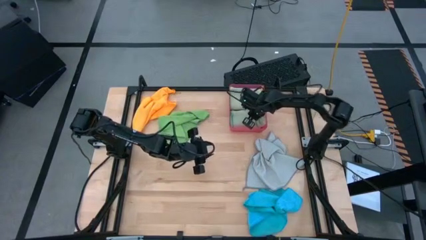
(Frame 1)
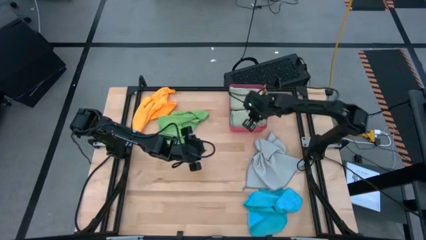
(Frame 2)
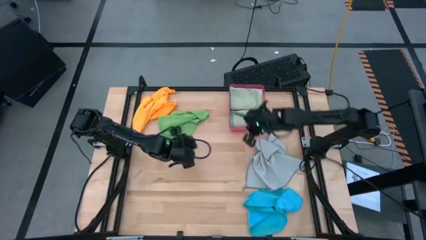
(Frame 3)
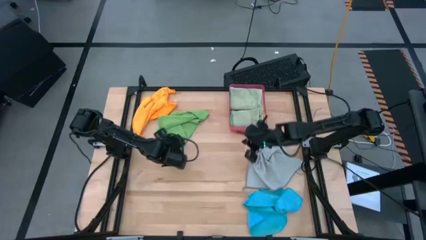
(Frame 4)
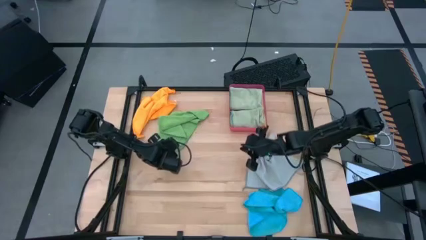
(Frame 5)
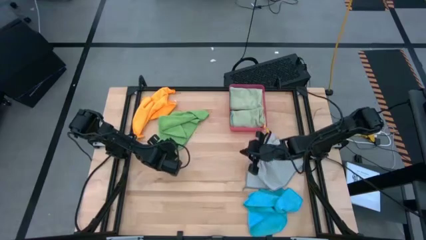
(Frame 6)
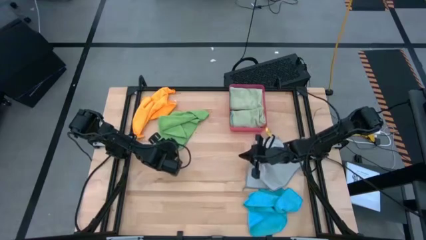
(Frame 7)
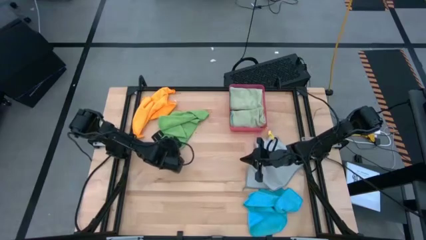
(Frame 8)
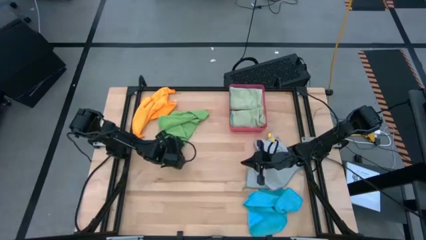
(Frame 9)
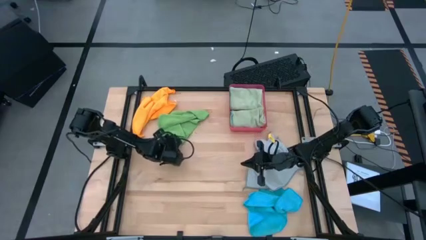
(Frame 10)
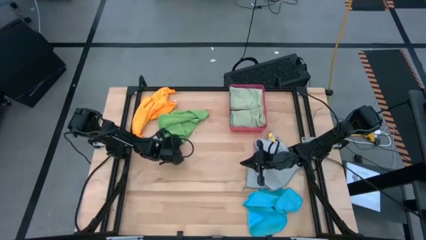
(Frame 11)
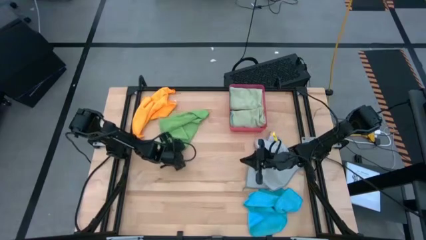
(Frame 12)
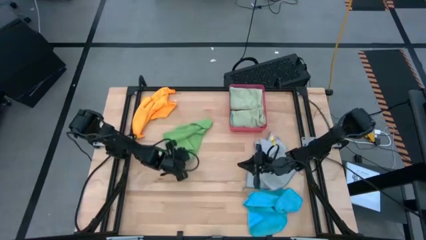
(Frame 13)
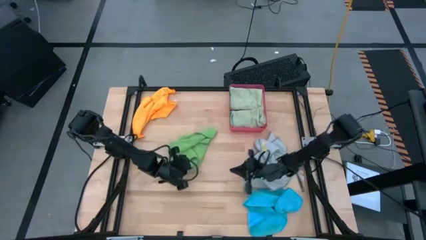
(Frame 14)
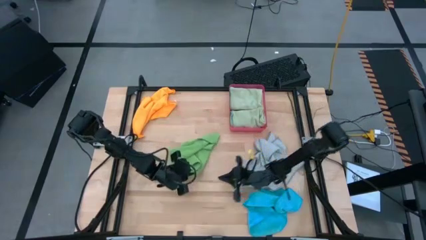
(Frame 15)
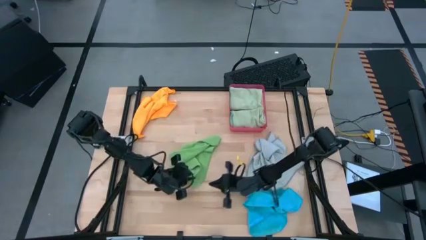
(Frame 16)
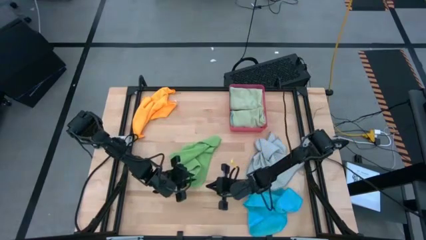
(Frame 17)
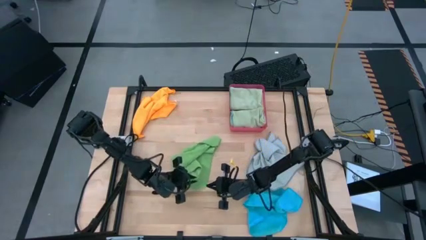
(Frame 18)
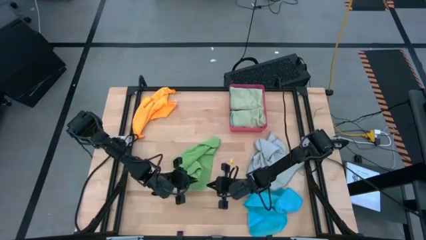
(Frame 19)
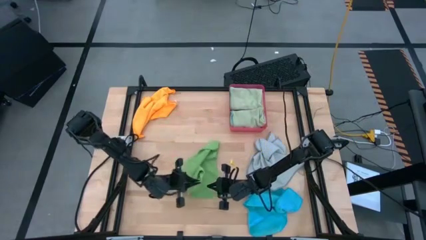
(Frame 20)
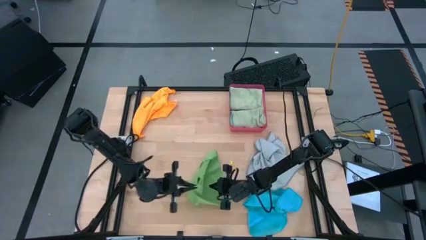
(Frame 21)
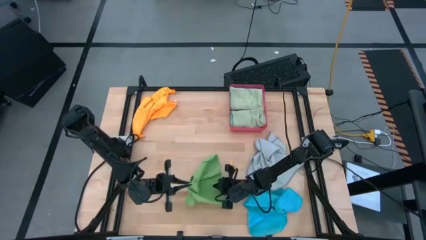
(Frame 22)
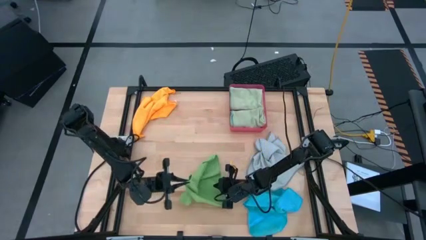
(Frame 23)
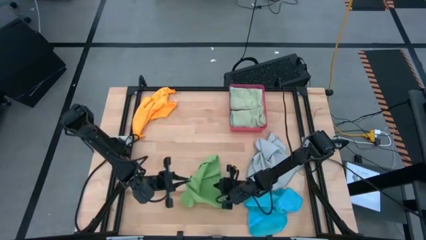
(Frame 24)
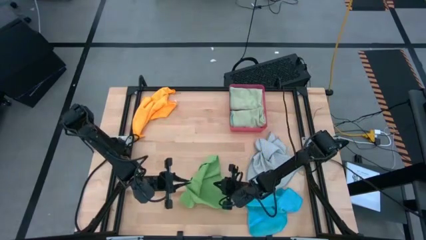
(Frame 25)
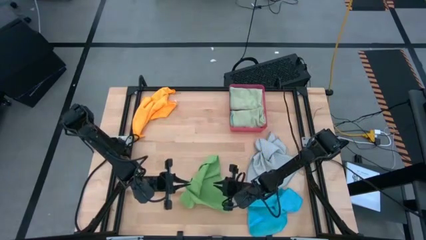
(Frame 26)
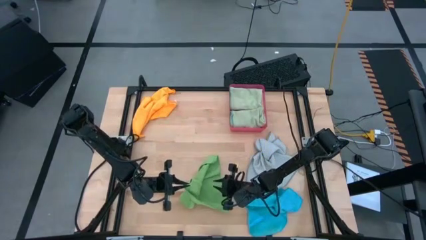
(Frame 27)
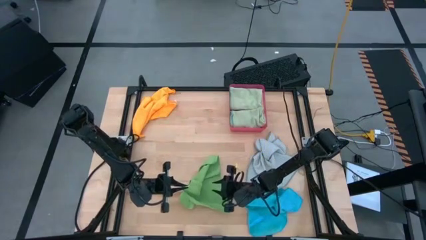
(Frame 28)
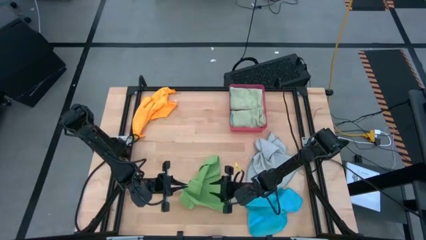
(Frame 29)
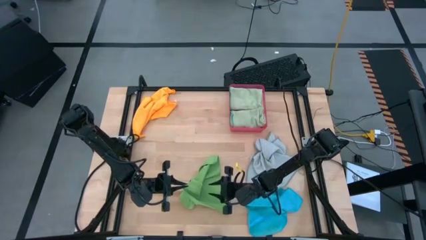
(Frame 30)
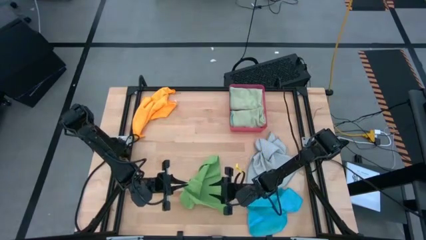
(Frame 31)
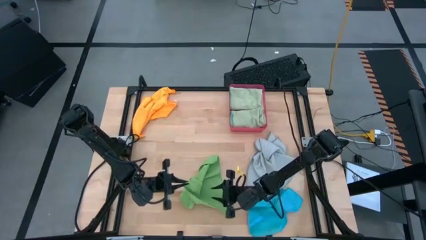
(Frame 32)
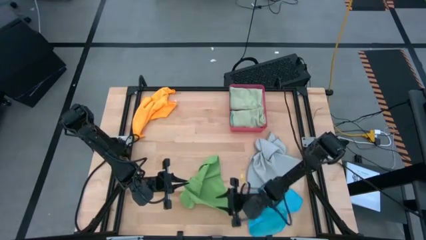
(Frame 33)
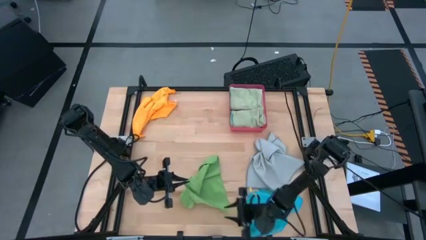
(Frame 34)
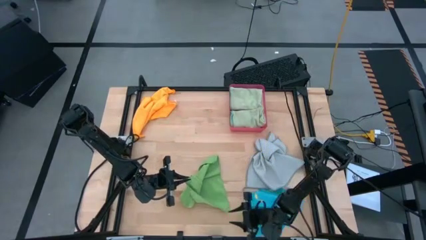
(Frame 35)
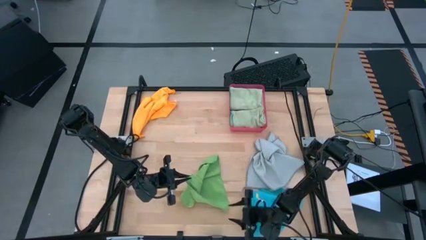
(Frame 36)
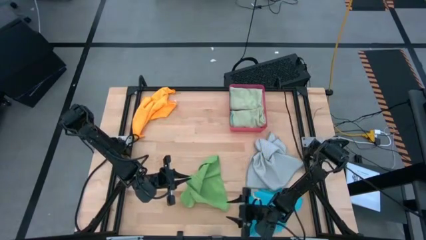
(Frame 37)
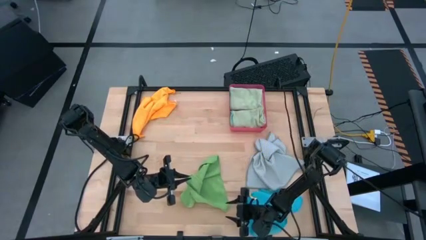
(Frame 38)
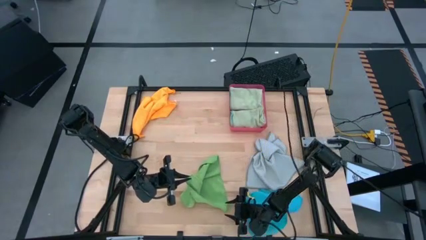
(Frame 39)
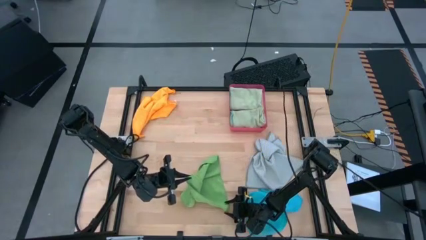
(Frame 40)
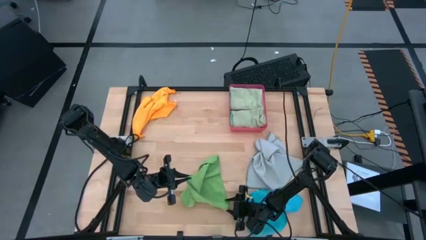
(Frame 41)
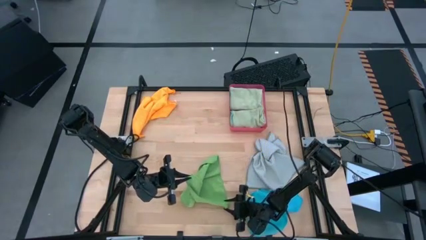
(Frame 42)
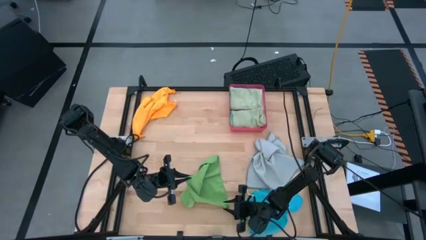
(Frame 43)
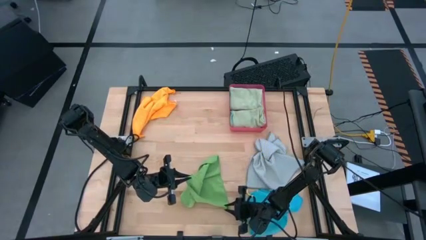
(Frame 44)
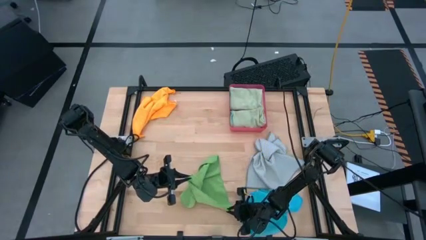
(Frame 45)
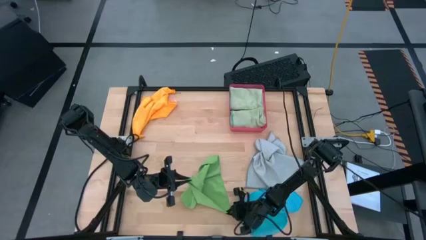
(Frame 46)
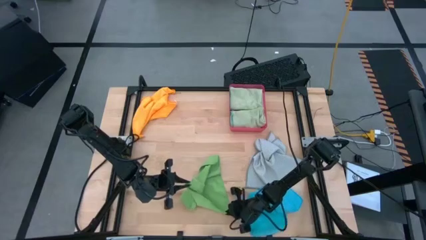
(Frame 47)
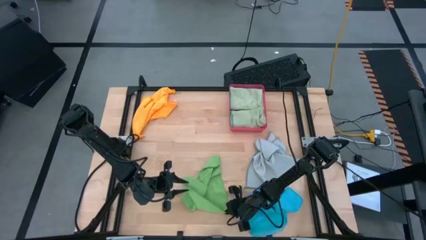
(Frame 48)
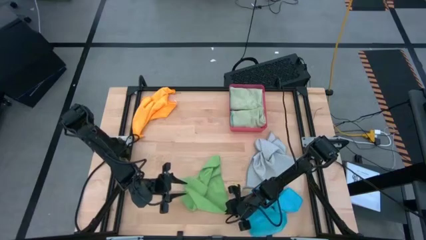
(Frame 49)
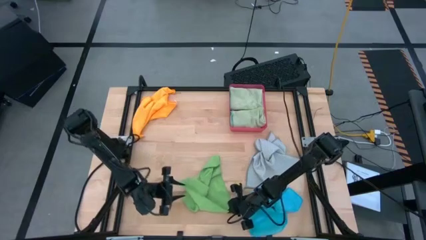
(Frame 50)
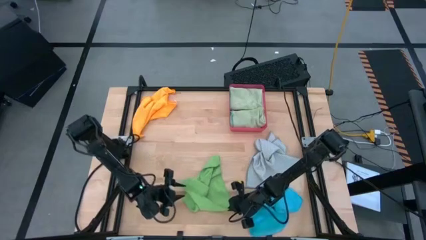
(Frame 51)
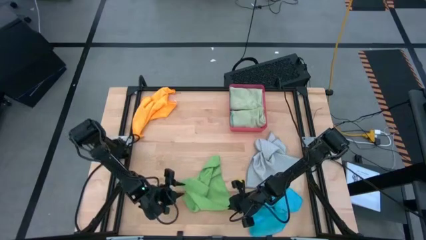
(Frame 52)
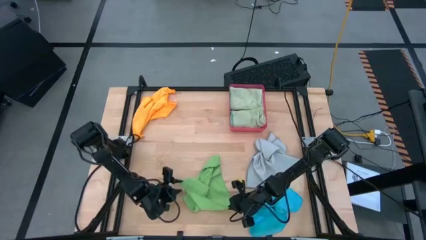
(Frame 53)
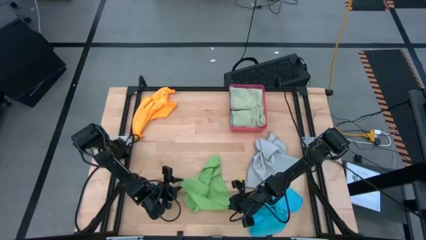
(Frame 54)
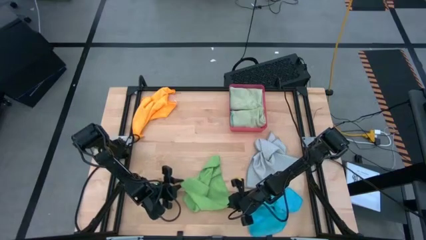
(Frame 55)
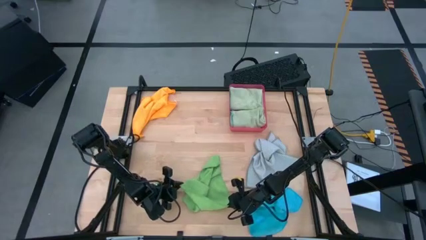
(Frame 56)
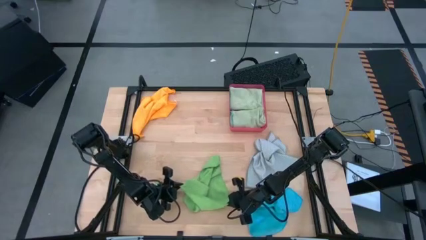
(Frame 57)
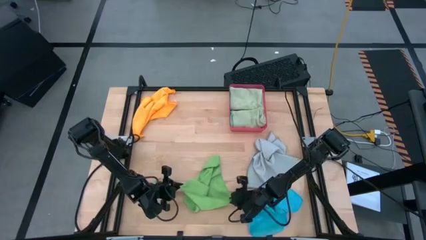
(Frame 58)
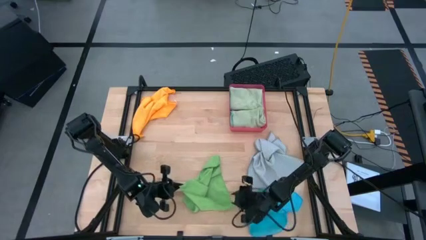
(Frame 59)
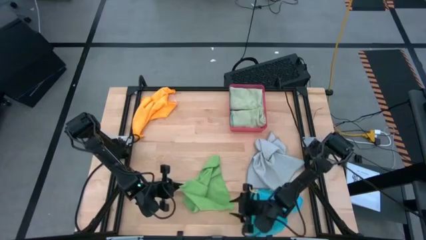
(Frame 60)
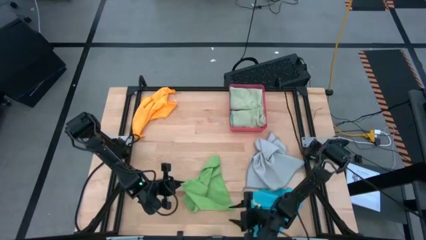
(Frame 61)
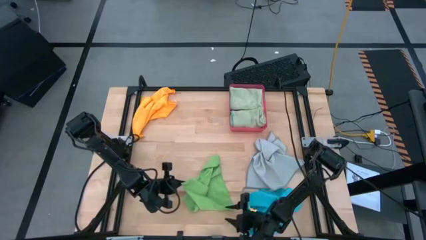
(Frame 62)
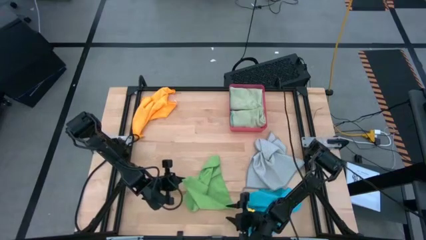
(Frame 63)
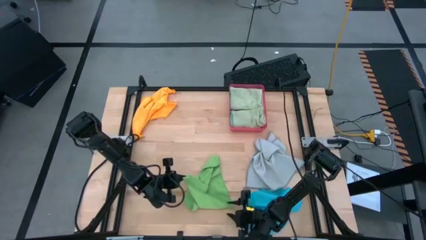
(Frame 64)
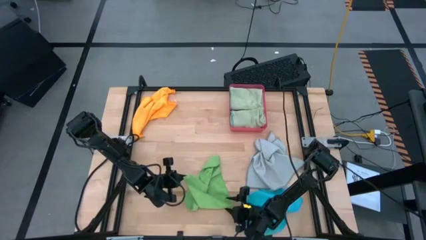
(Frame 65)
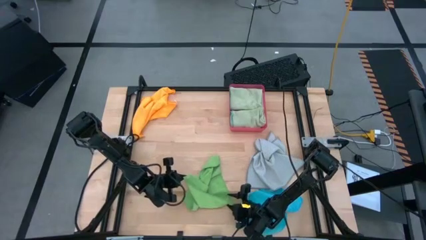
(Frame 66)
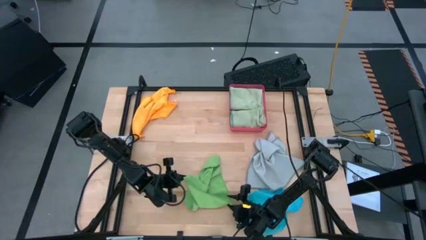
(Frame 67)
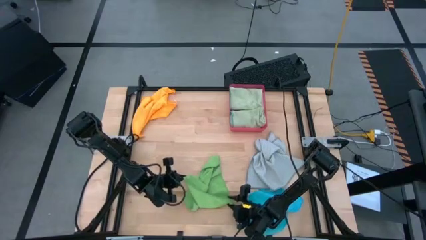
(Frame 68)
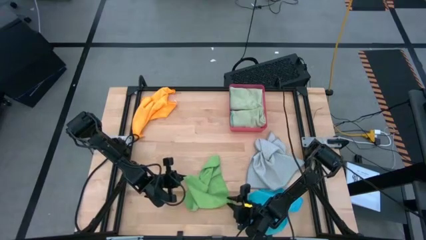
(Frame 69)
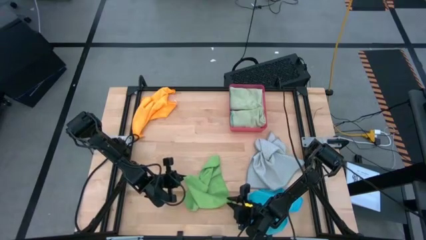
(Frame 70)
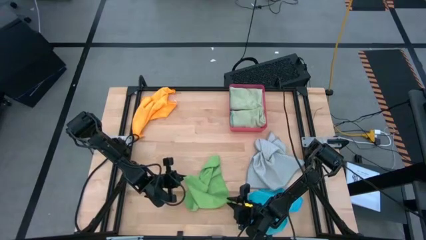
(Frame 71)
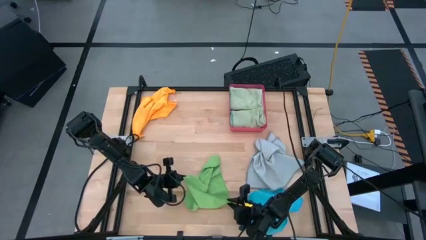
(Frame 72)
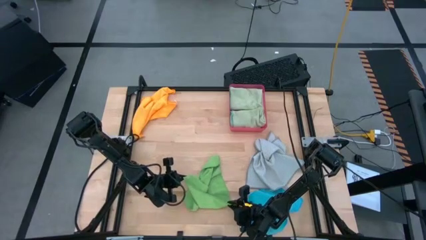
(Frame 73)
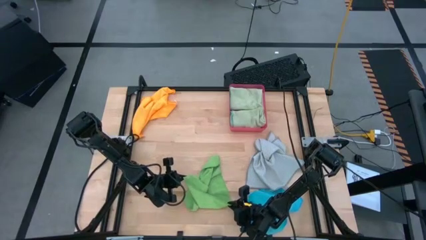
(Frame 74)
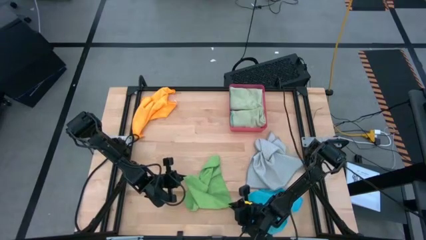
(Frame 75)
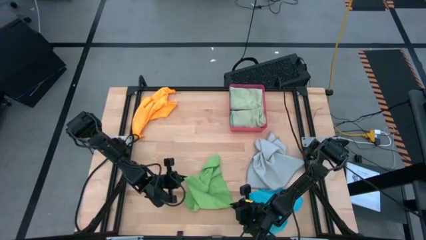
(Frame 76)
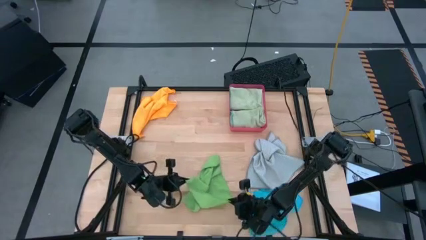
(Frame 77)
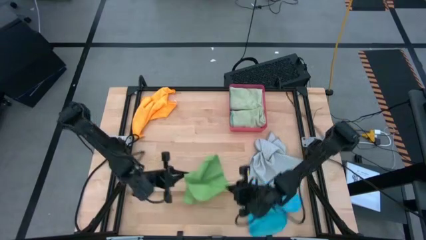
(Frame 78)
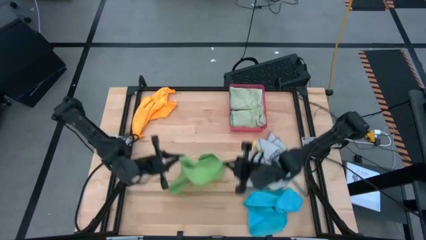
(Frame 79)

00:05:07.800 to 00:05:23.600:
Task: Fold microfiber towels
Fold the dark green microfiber cloth

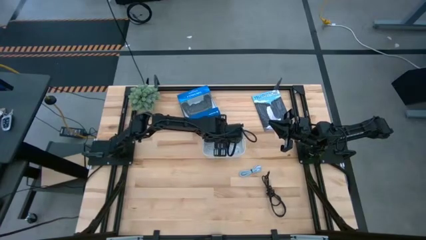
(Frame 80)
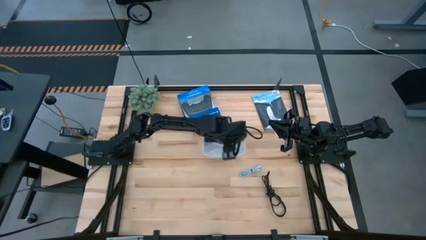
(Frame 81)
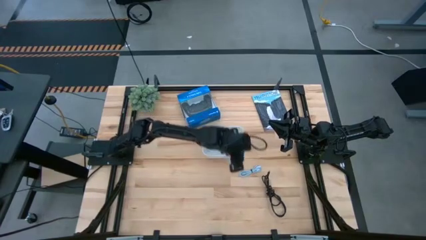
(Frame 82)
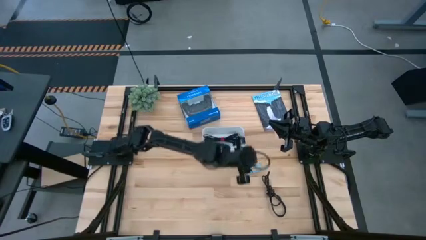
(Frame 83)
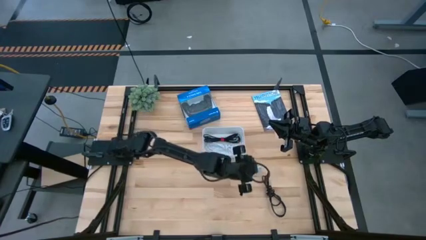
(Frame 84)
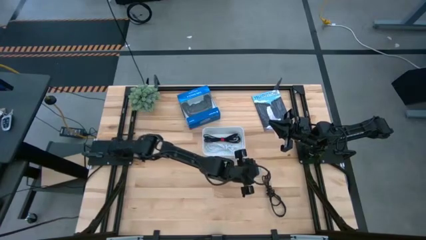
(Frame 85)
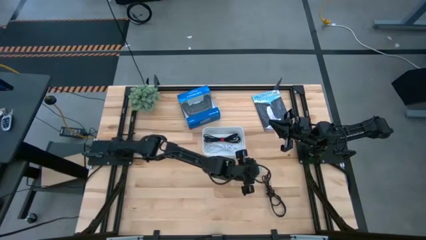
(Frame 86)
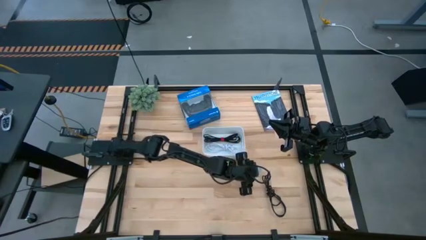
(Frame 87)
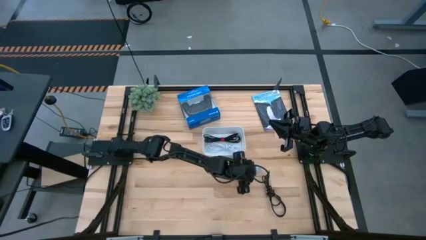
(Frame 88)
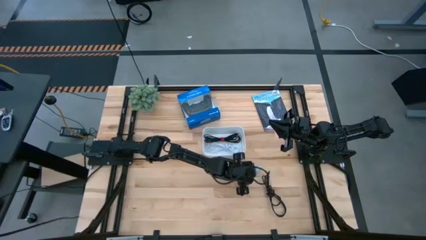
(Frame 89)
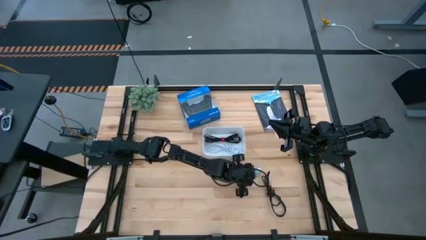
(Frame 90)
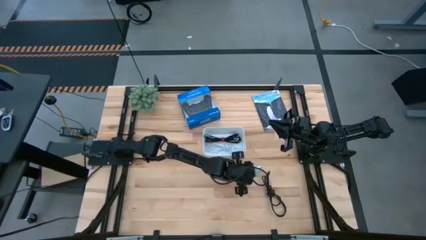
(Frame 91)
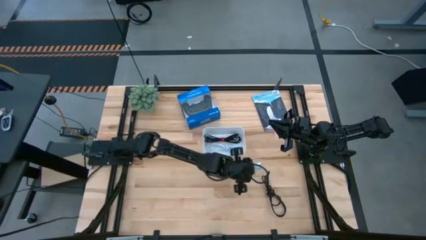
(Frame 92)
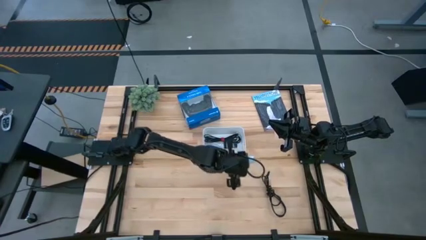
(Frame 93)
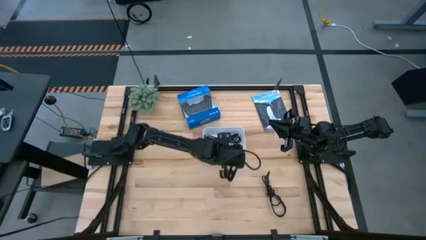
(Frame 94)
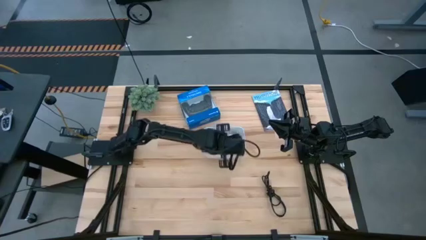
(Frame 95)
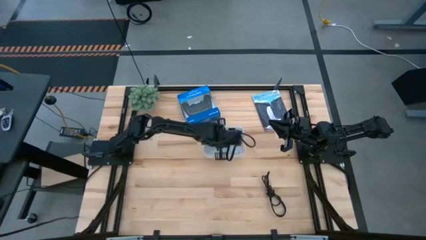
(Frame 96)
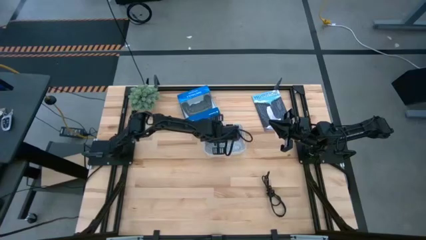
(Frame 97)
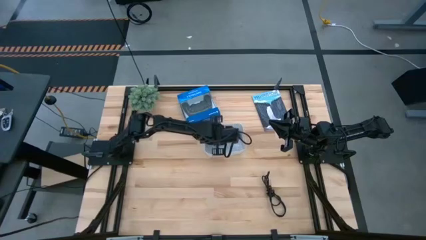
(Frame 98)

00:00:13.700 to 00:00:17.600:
Task: Pick and place USB-C Cables
Put the blue charger cable into the white bin
